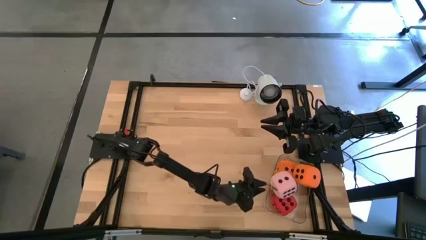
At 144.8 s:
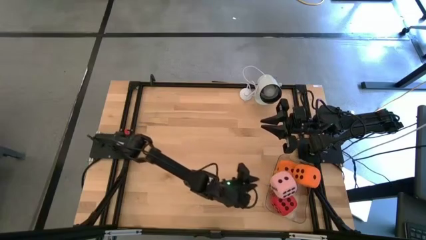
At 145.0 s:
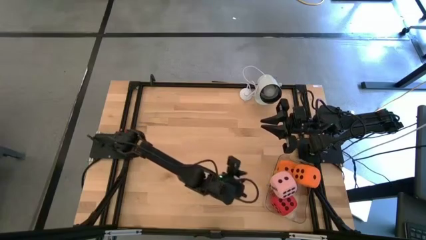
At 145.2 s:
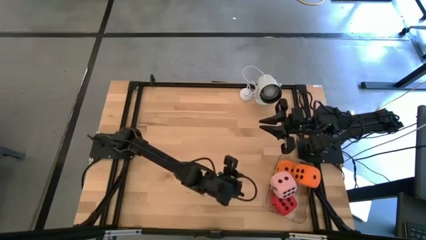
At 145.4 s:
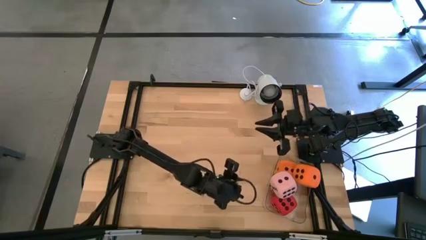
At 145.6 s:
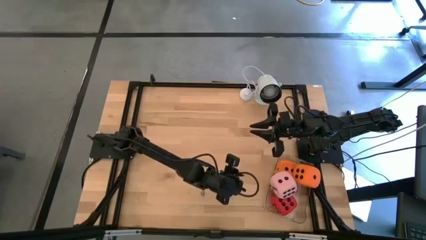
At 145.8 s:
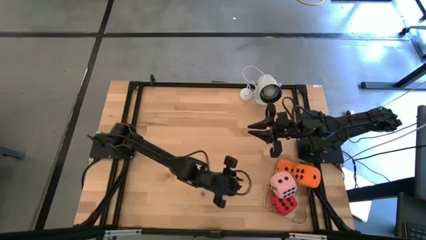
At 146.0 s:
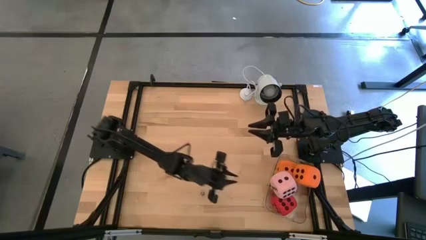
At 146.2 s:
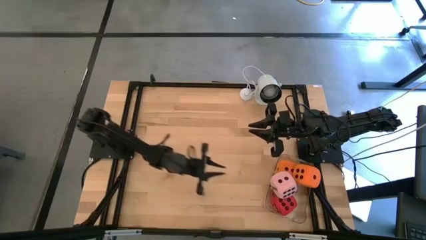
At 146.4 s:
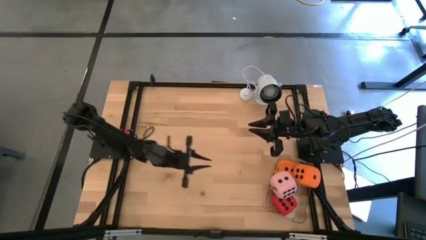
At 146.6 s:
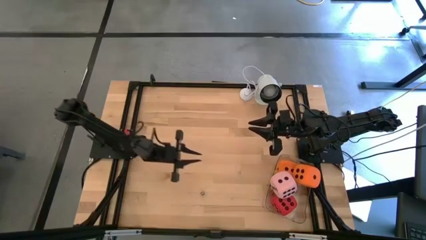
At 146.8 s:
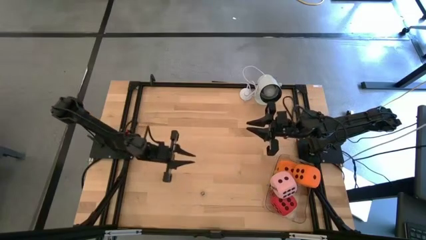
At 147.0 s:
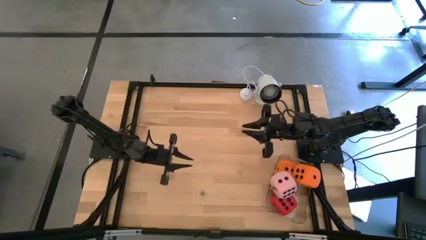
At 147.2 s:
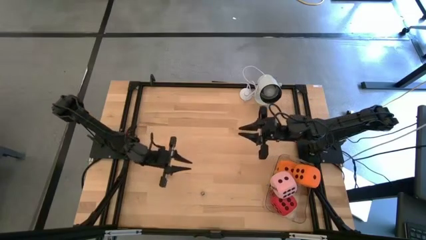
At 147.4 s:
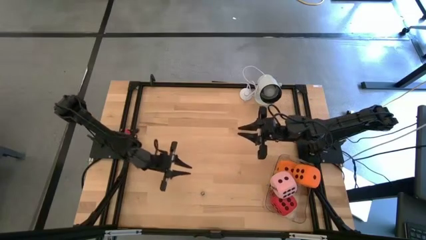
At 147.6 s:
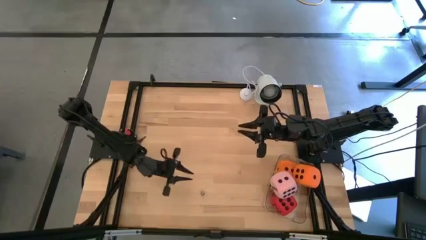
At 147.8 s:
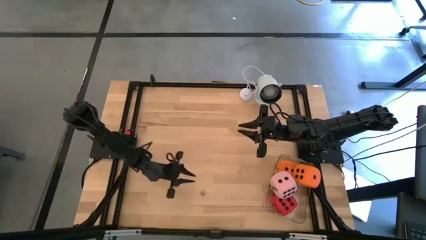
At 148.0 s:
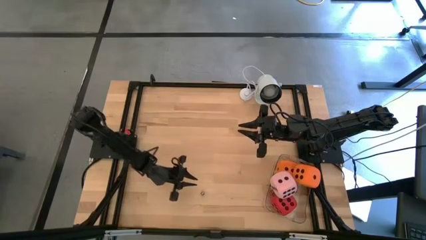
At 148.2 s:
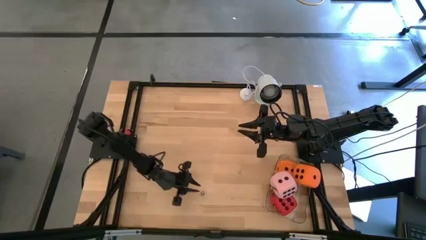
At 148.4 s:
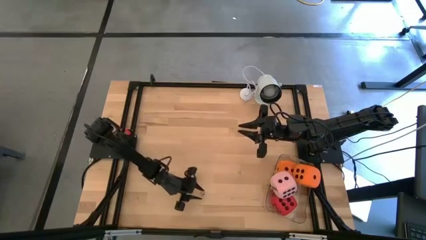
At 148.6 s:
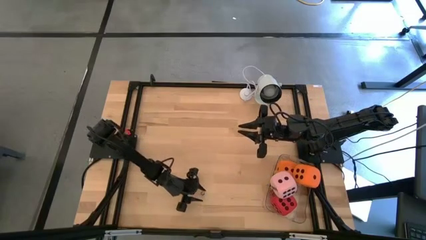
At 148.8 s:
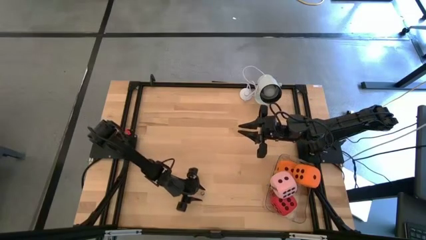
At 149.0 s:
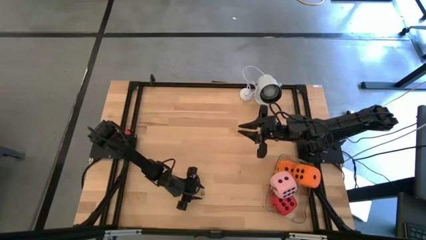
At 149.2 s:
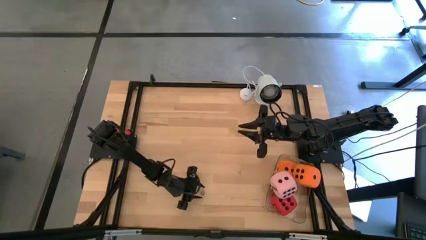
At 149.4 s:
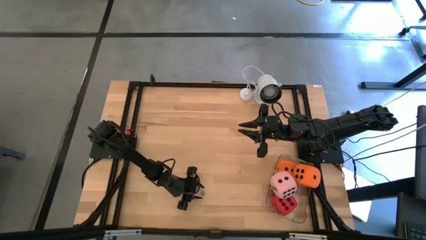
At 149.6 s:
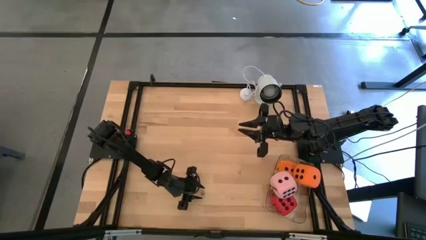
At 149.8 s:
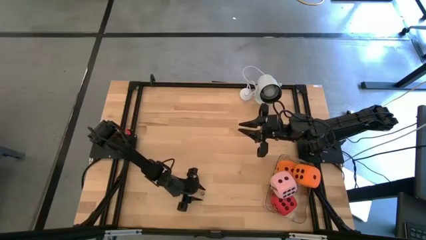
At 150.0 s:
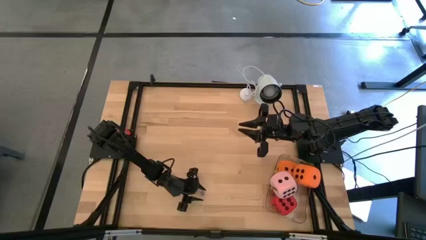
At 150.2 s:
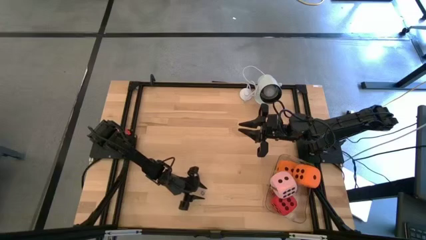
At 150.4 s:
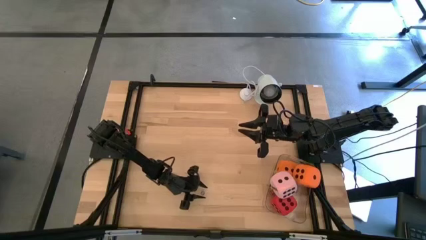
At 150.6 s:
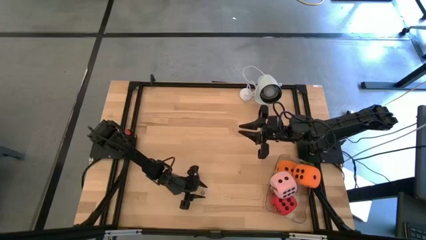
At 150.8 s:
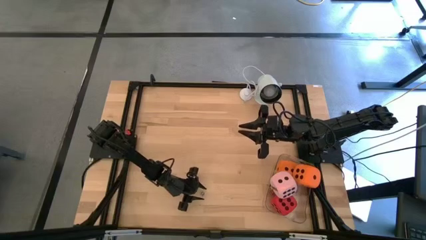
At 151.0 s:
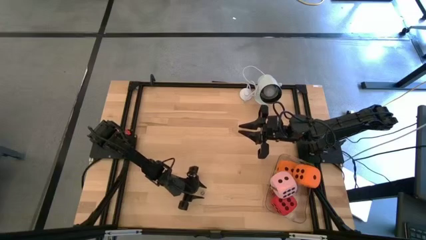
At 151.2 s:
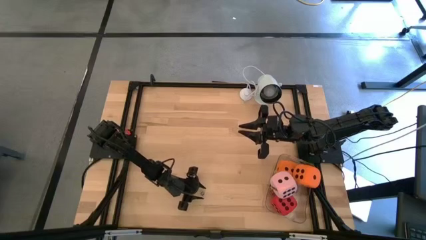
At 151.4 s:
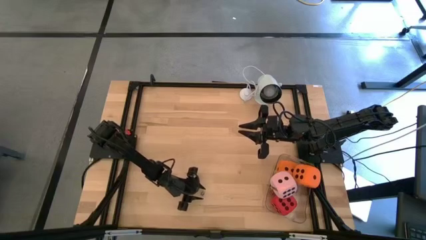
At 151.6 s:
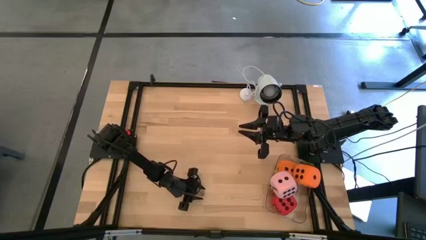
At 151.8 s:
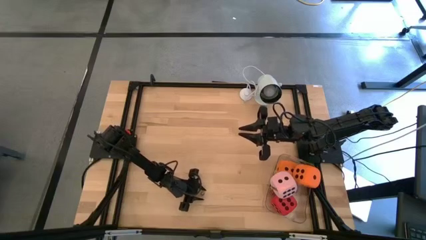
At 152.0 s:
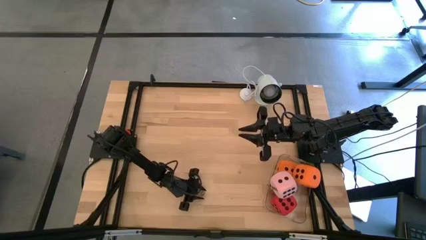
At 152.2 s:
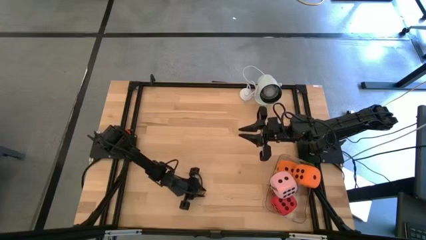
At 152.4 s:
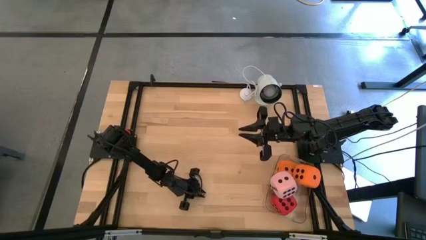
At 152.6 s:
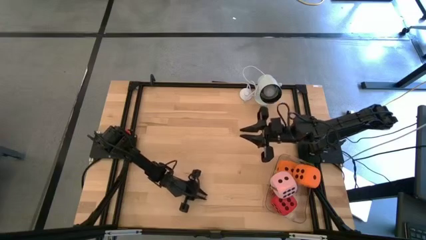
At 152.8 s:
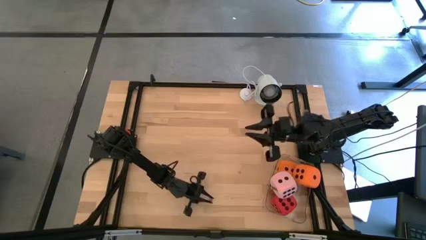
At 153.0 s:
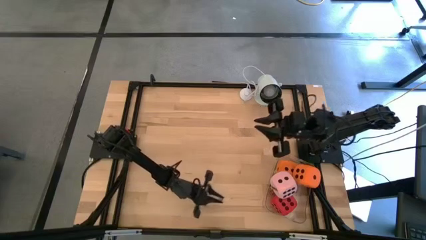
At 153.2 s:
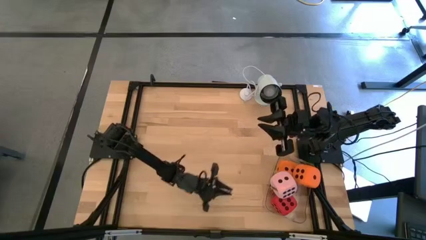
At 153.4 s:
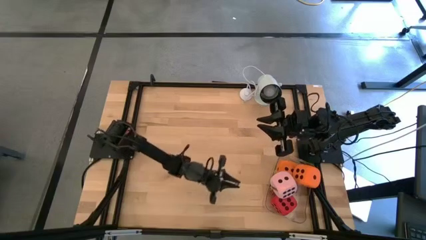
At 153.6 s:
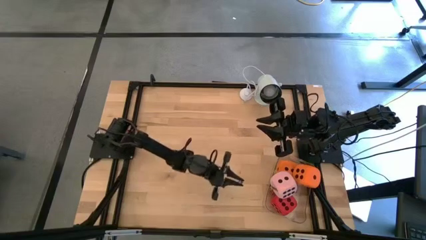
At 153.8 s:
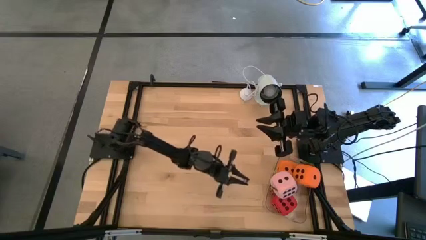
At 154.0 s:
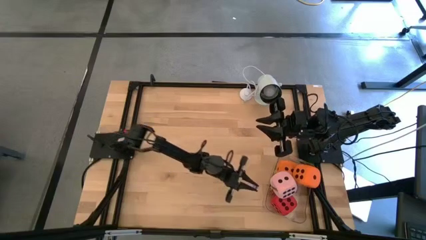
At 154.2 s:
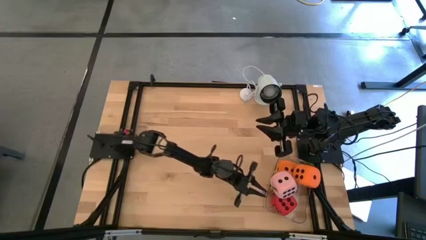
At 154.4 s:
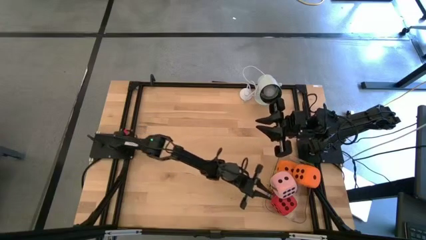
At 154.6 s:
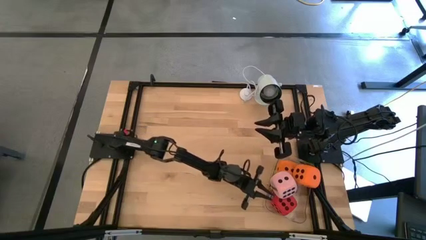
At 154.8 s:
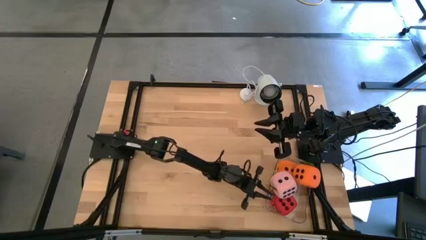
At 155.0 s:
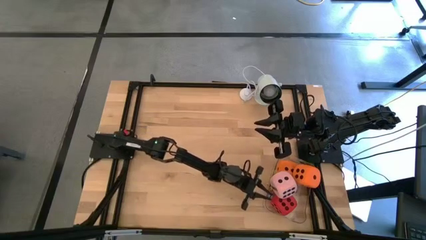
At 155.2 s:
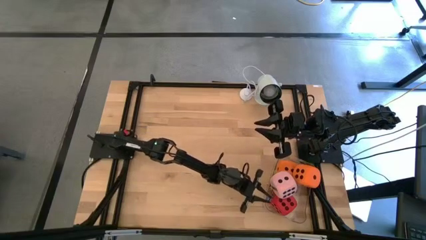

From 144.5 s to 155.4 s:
Task: Pick & Place Dice
Put the small blue die into the transparent container

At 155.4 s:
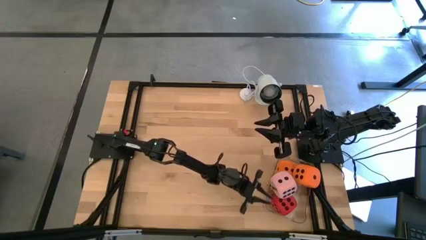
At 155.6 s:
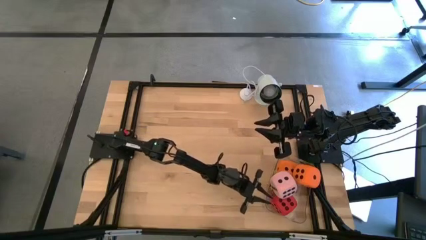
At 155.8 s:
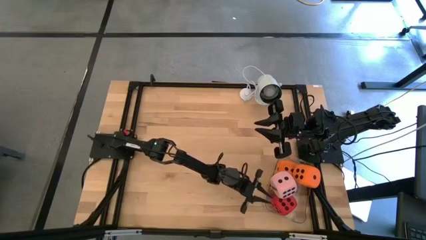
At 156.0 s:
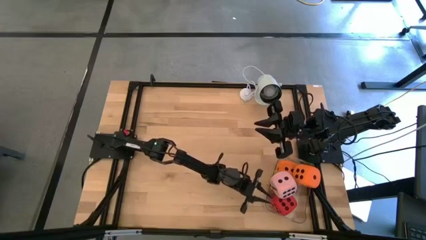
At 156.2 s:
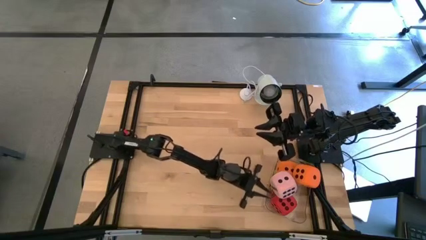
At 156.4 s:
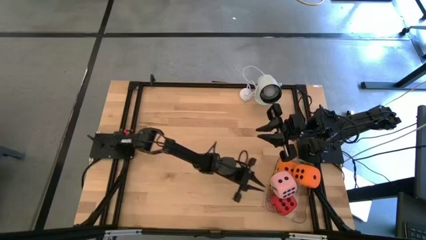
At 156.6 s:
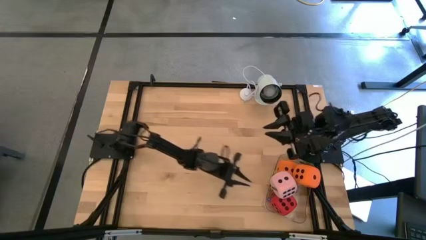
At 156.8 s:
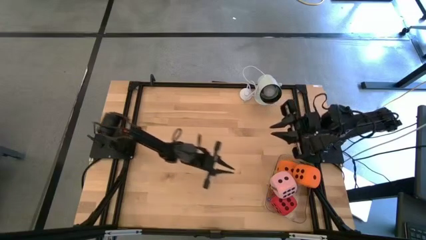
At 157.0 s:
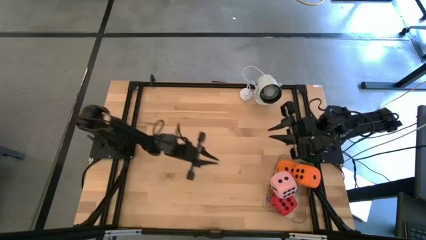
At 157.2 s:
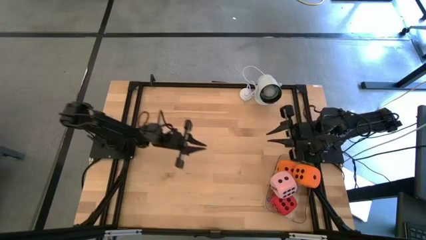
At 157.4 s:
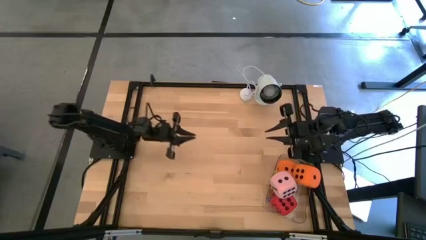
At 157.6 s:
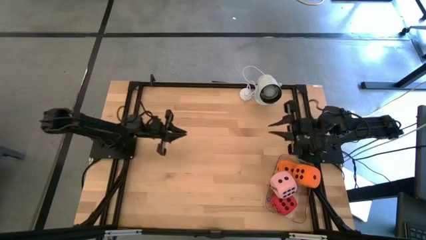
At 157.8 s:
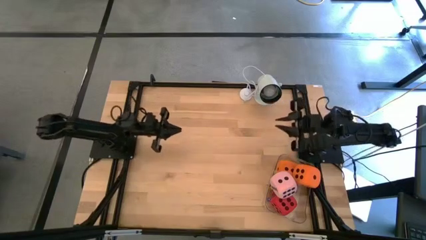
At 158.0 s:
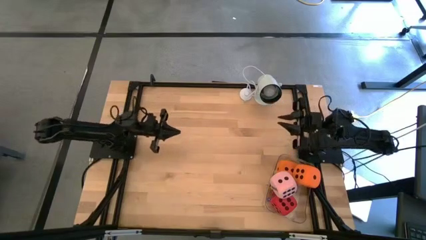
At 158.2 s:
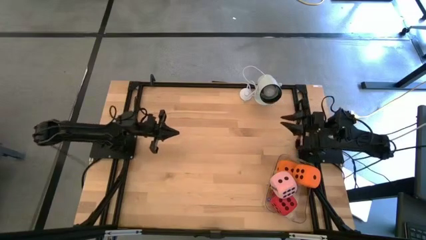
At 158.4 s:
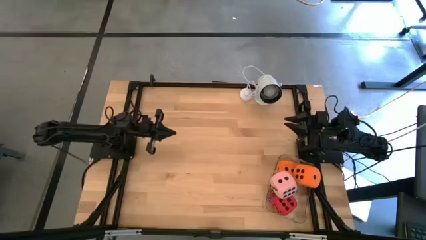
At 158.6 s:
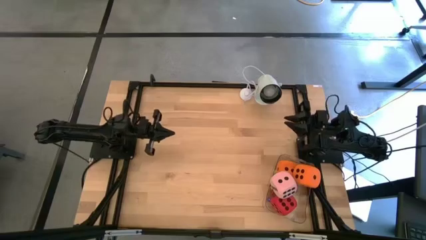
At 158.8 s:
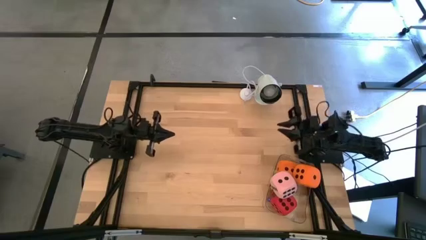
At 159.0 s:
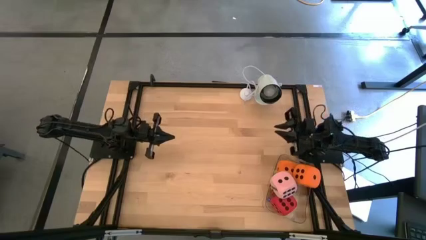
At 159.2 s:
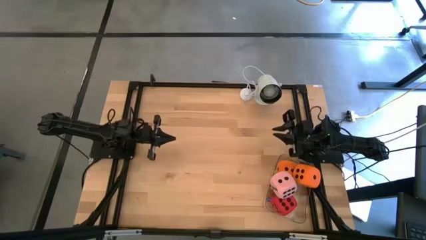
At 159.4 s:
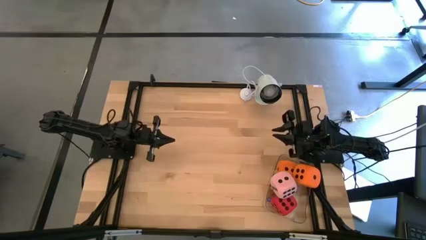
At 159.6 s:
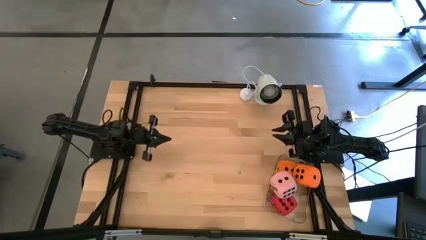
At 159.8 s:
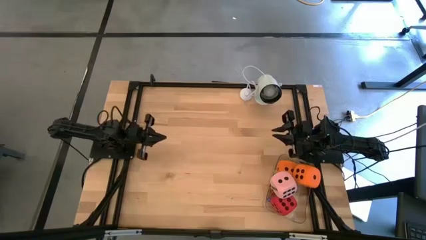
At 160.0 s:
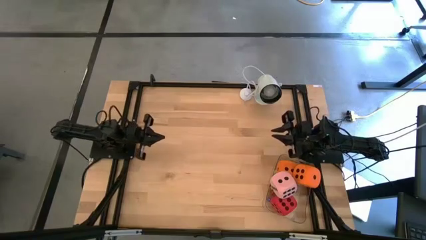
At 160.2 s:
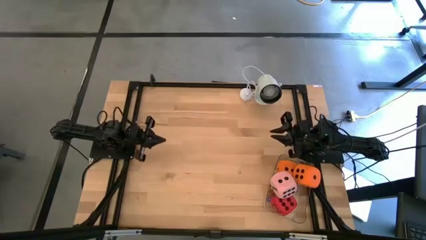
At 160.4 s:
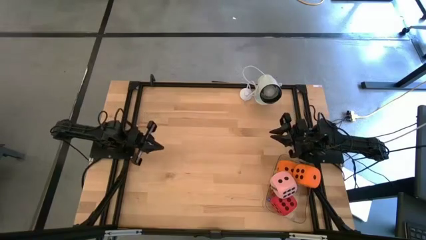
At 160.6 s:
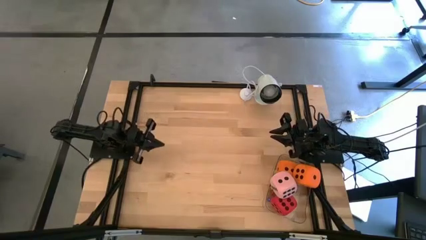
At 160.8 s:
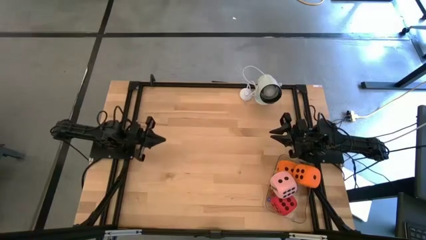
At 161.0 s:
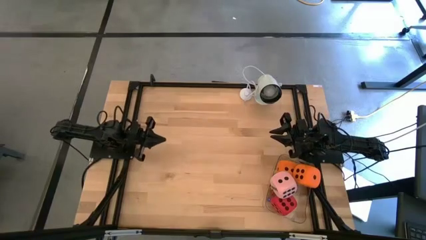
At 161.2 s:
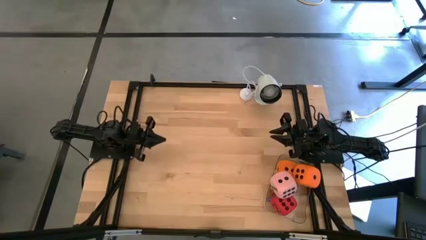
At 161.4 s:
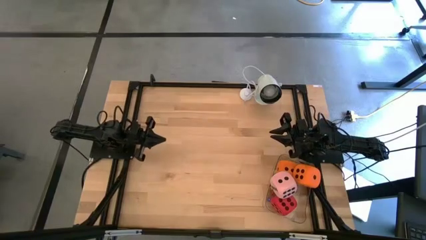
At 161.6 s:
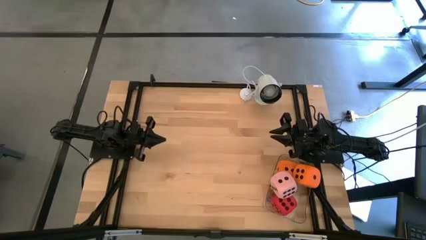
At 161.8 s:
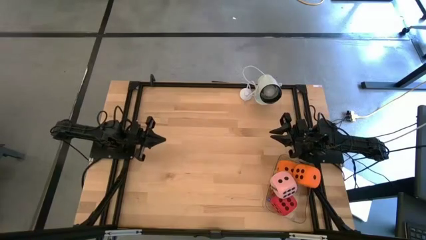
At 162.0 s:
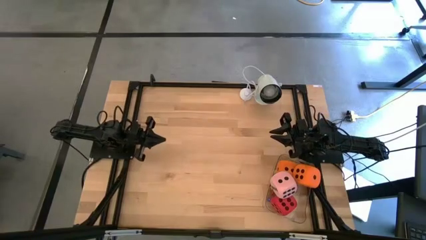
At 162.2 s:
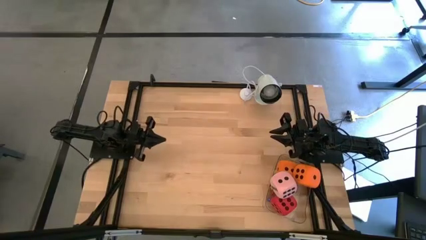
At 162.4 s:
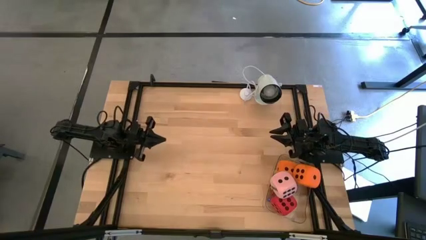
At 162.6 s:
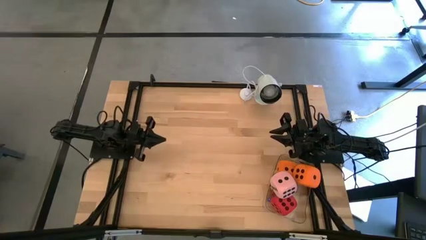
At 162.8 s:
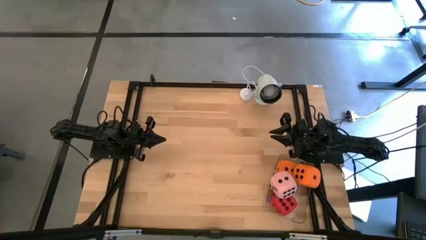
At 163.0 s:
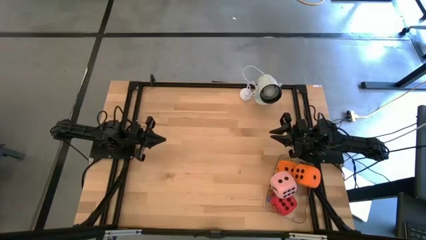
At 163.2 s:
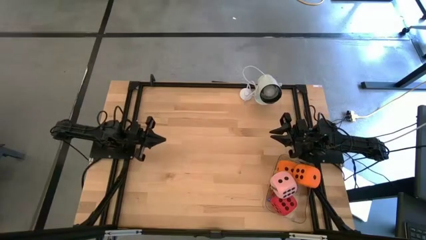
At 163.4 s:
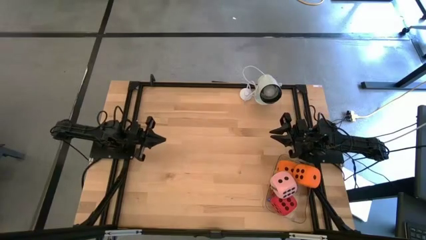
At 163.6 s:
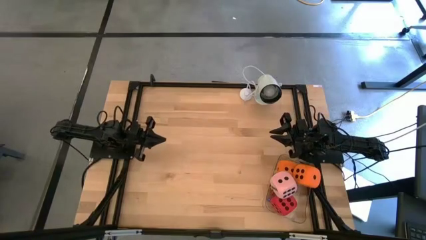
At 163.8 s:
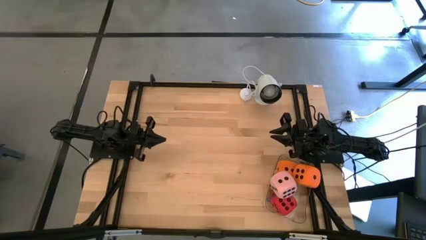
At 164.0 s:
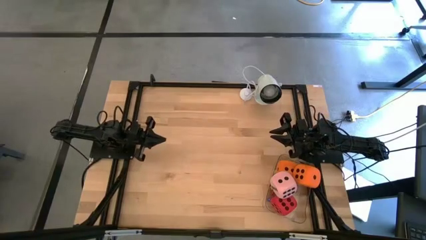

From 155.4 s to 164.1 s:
Return to Home Position
